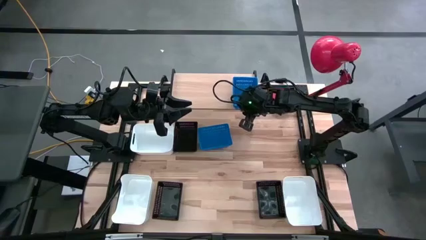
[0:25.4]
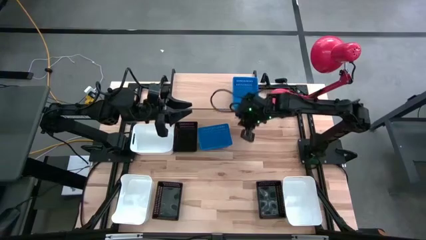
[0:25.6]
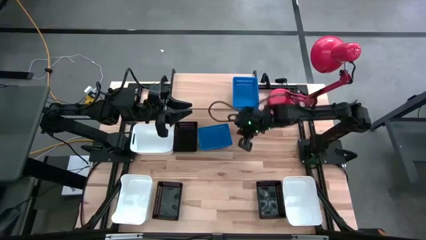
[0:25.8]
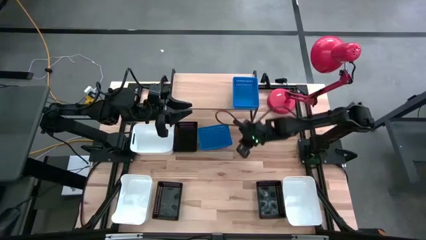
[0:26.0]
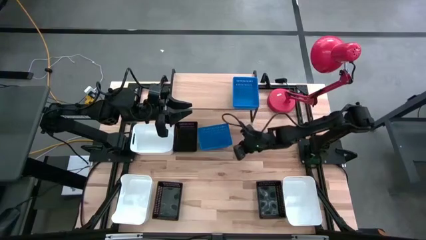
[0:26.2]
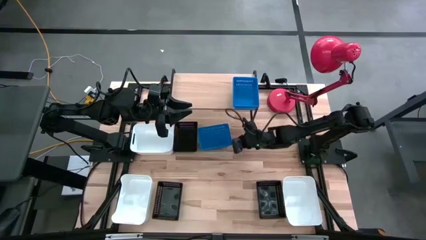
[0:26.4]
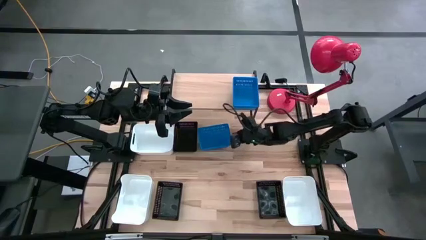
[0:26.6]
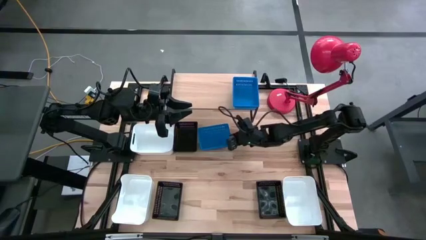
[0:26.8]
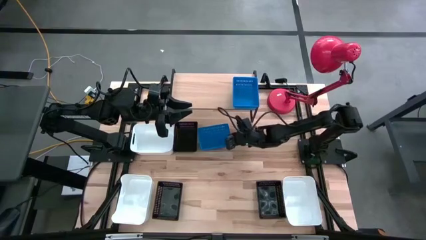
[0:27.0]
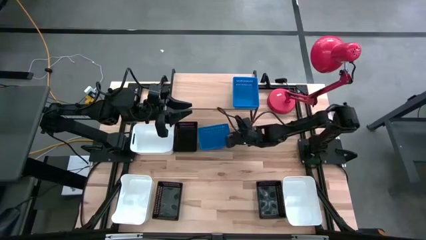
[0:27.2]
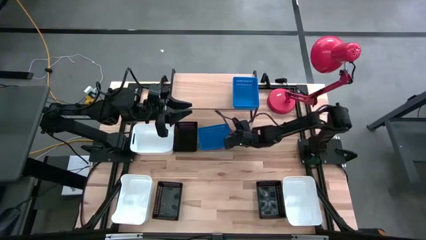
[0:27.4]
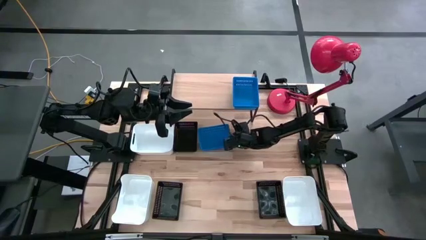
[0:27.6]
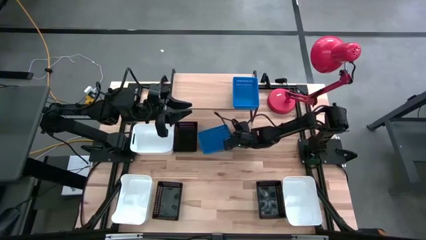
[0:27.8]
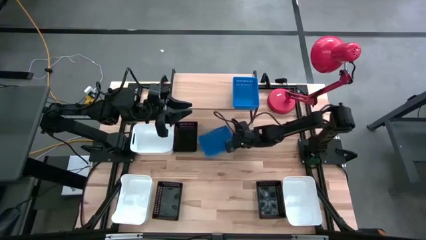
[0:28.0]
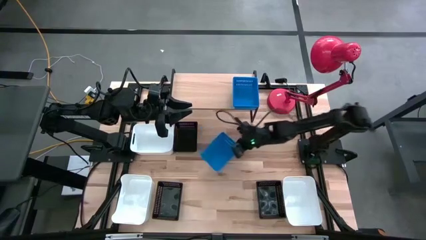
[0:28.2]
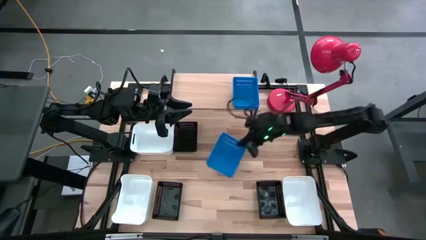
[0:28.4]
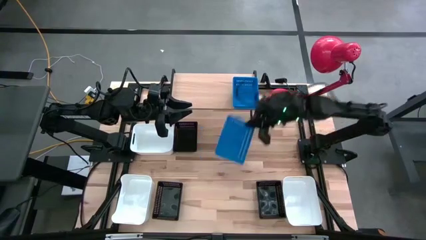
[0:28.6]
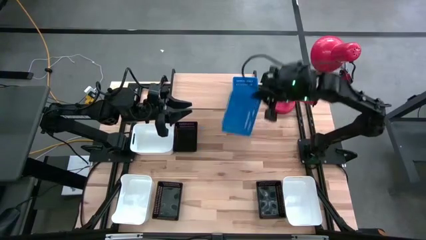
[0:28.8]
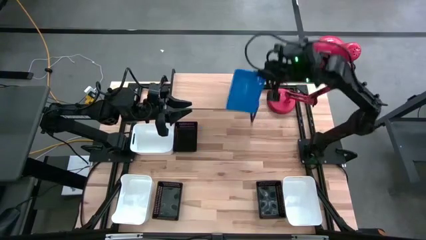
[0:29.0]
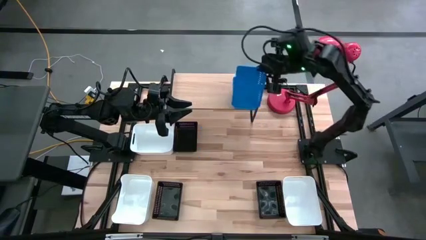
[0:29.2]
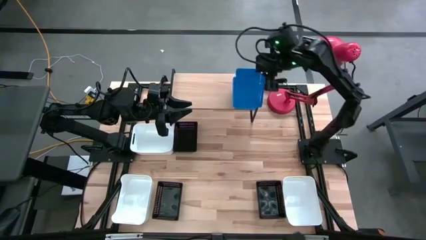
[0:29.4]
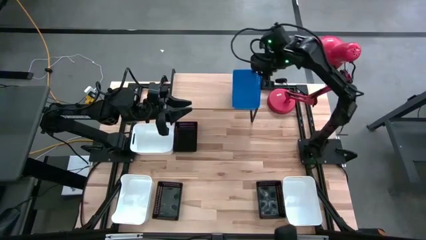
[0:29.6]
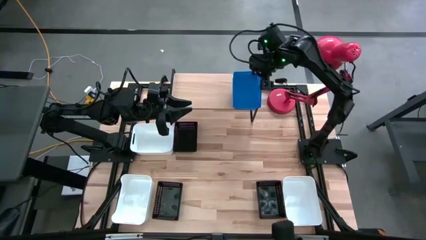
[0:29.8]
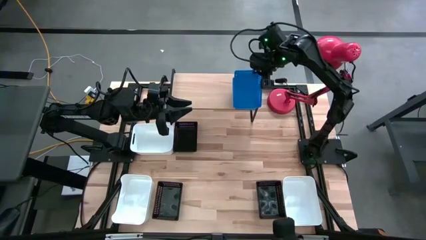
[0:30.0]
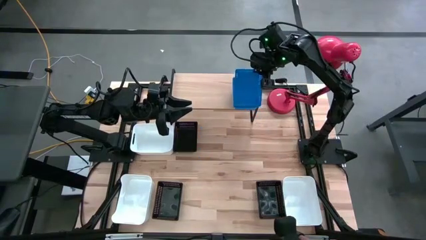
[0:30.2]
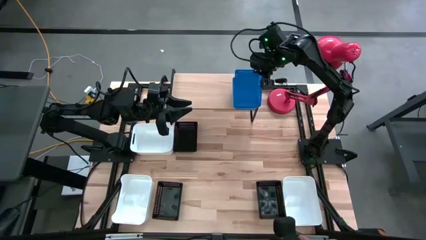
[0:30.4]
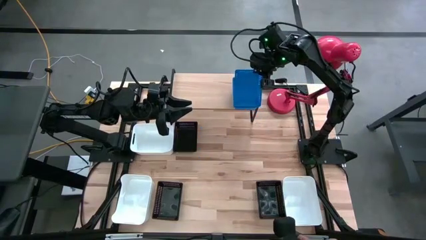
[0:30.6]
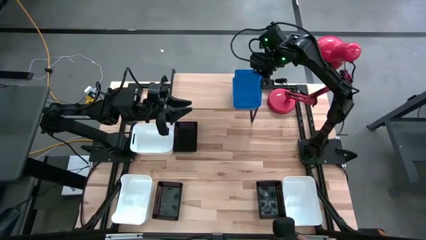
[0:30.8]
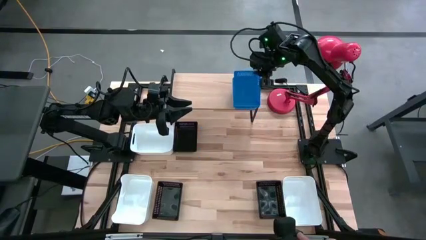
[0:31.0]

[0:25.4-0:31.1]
Task: Stack baskets on shelf by color
Stack the blue bin on top of the other blue bins on the shelf

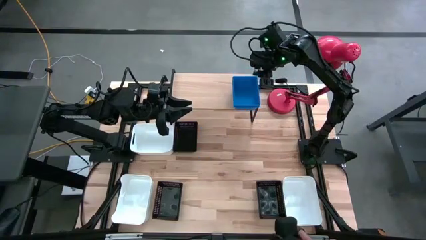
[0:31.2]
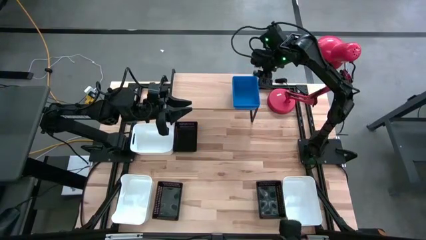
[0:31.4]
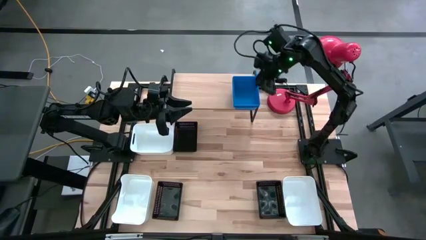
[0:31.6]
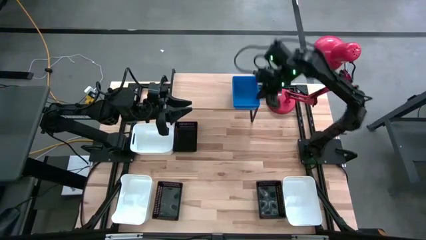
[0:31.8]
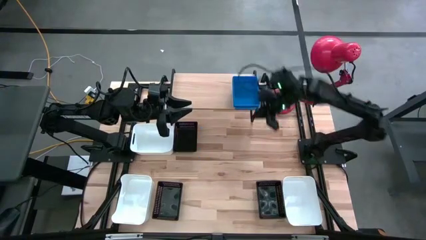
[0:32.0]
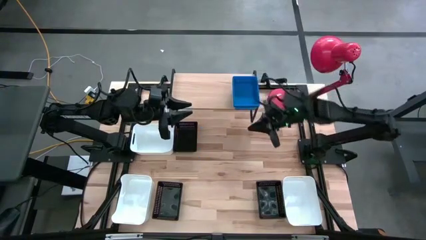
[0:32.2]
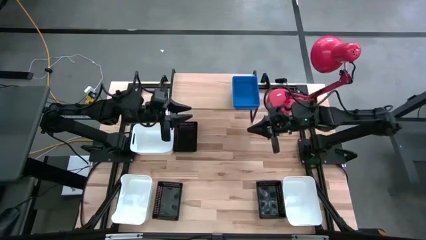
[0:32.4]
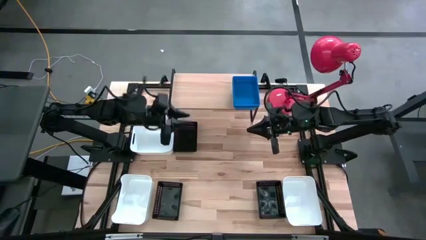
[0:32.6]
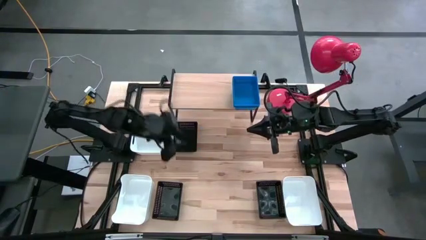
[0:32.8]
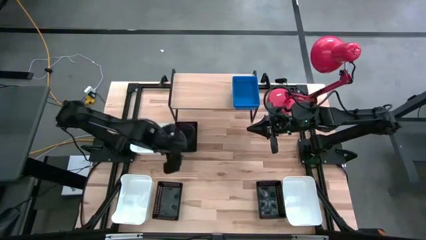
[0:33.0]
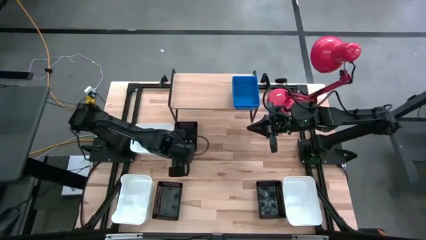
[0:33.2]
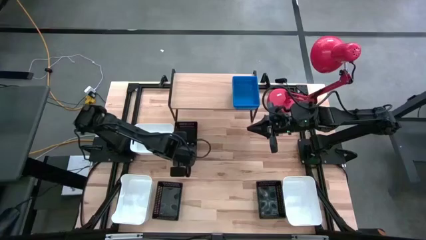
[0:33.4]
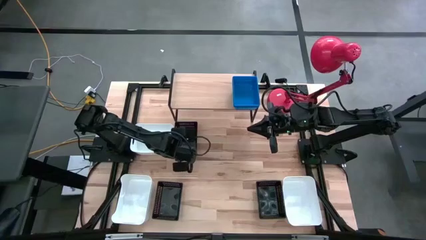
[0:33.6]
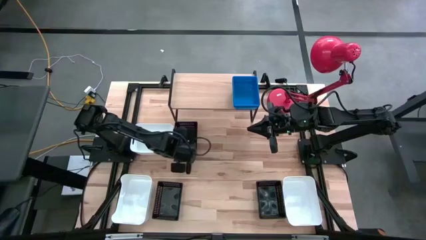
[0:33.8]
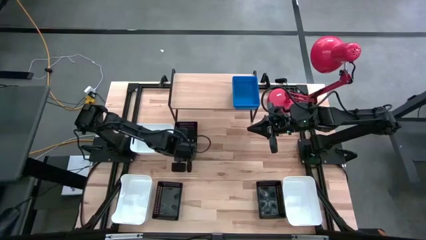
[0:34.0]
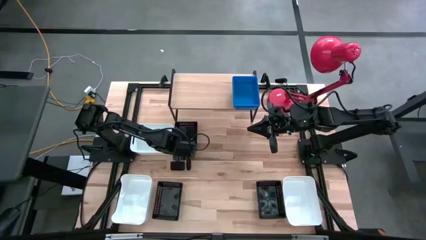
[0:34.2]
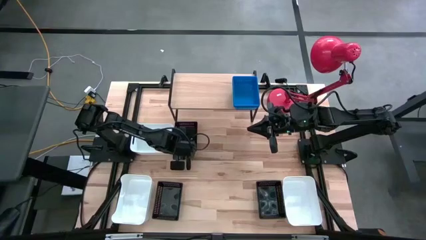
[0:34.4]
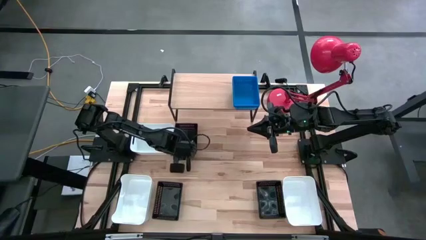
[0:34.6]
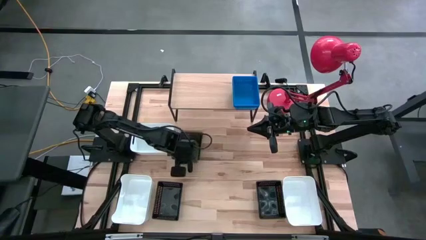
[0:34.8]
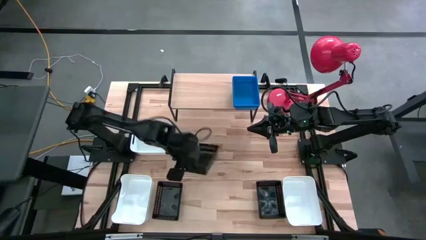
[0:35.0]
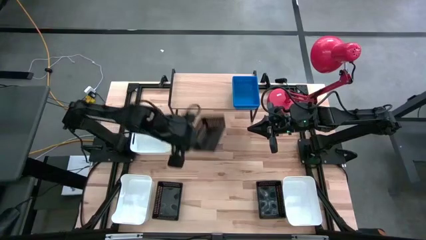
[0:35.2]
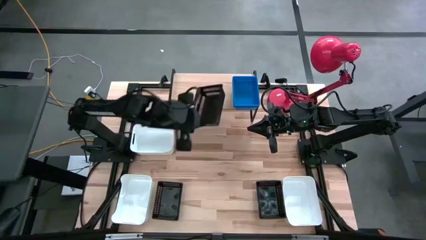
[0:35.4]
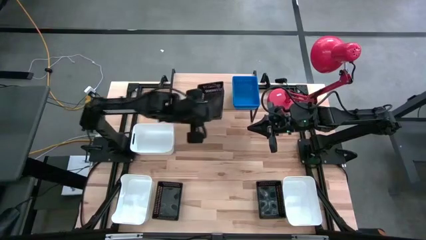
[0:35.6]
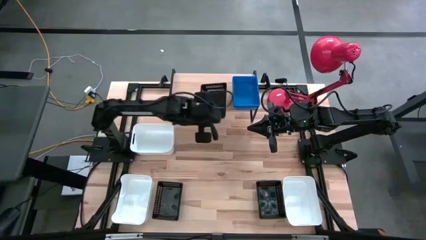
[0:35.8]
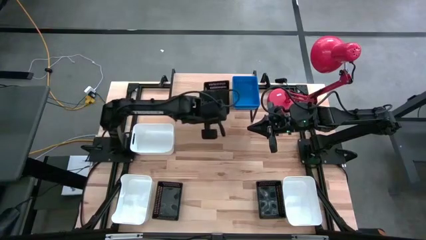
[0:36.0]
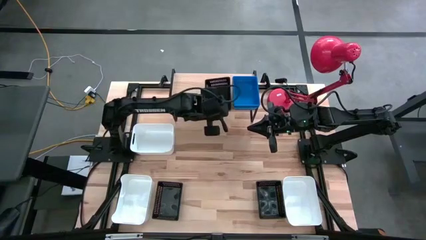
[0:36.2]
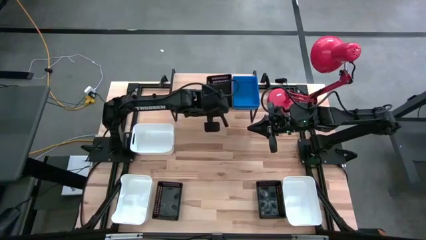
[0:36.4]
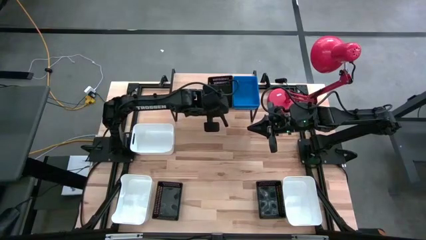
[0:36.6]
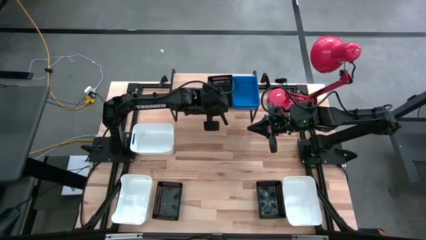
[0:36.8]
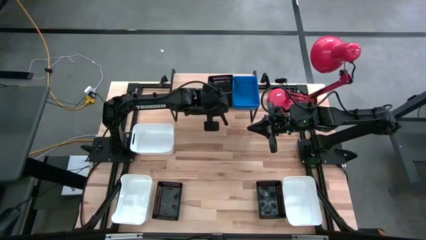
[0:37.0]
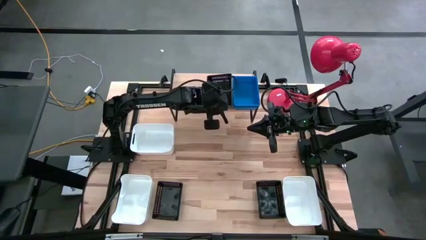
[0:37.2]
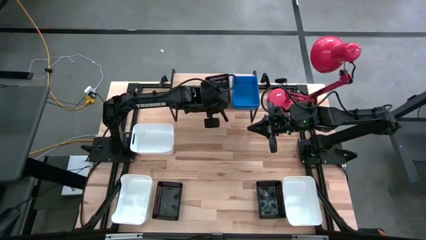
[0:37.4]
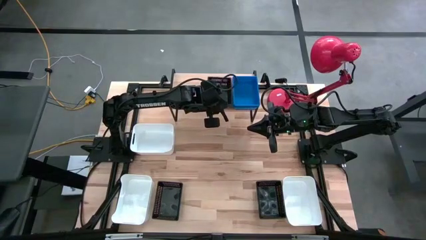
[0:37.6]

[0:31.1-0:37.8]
Put the top black bin in the middle of the shelf

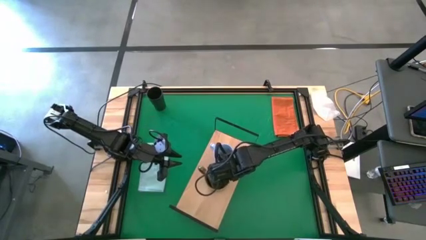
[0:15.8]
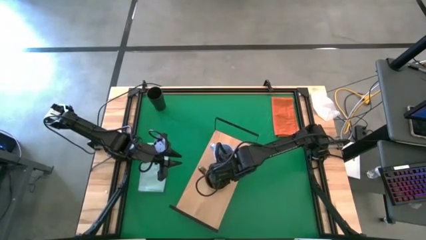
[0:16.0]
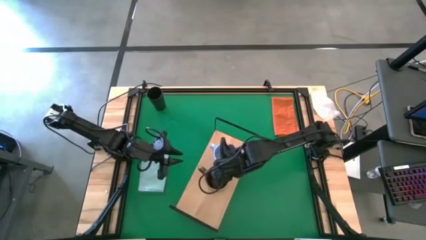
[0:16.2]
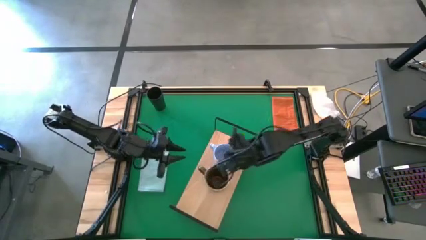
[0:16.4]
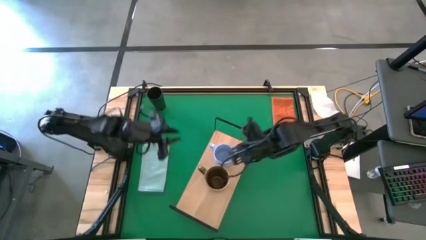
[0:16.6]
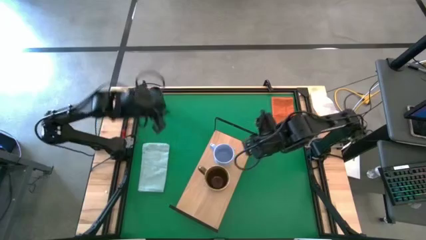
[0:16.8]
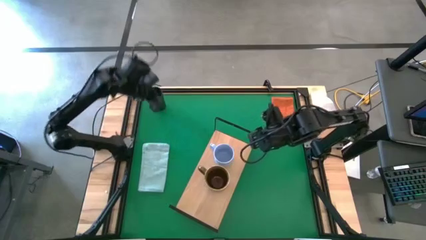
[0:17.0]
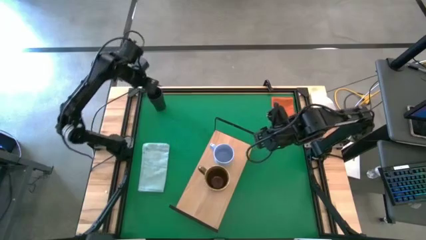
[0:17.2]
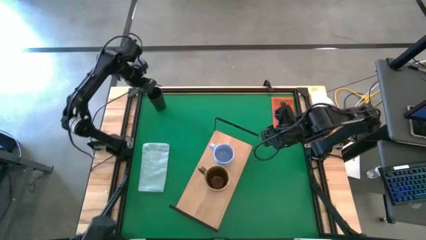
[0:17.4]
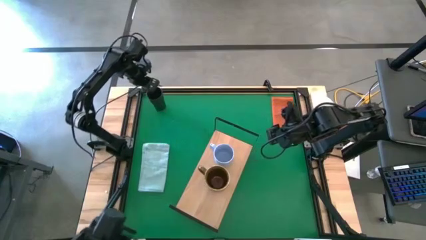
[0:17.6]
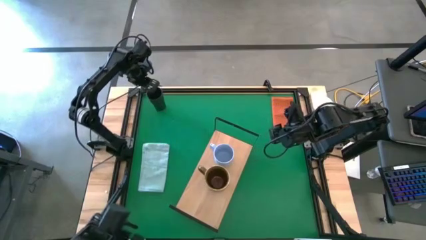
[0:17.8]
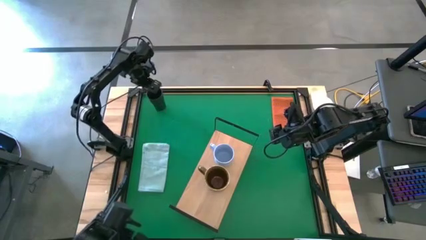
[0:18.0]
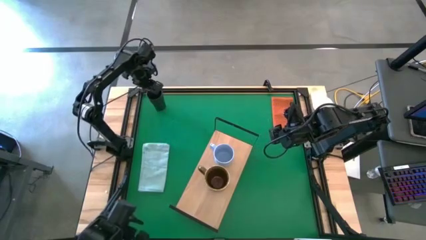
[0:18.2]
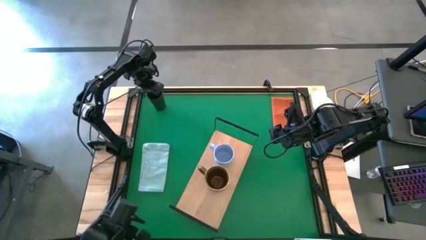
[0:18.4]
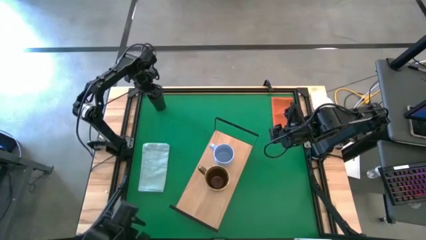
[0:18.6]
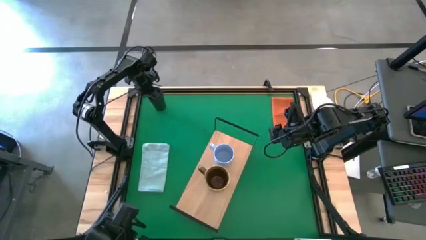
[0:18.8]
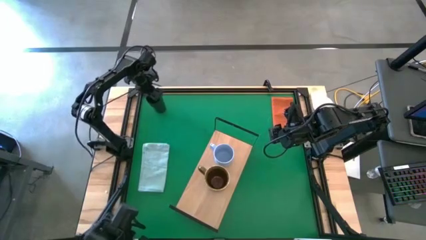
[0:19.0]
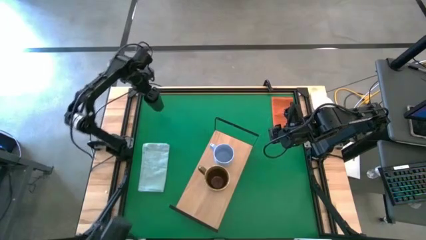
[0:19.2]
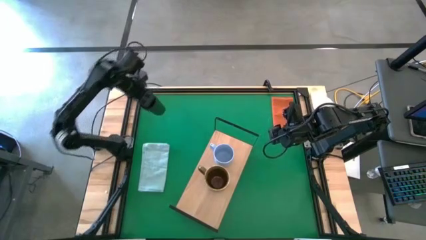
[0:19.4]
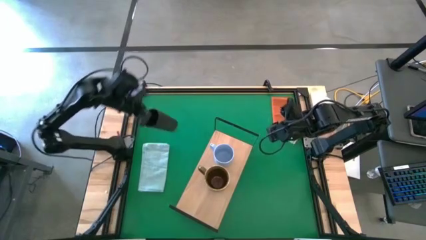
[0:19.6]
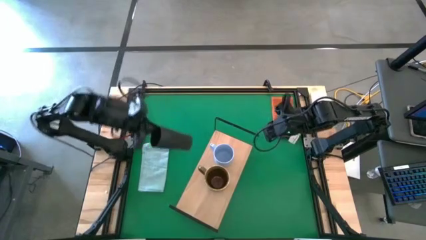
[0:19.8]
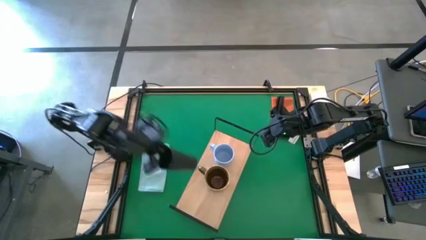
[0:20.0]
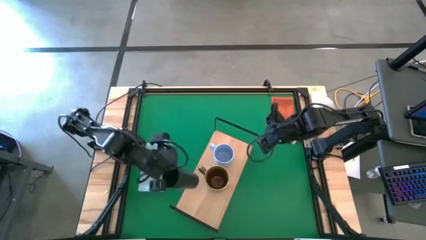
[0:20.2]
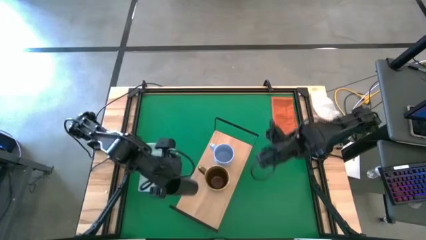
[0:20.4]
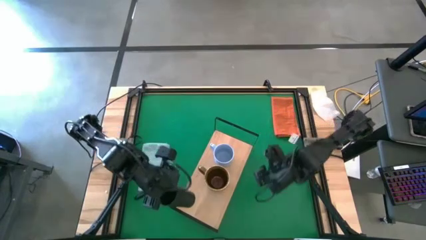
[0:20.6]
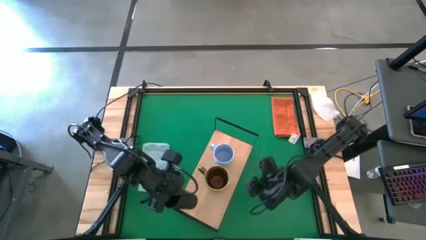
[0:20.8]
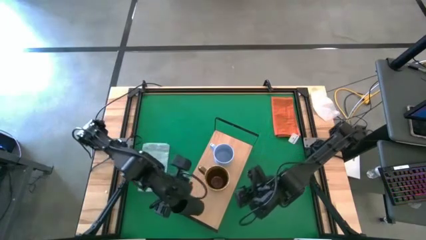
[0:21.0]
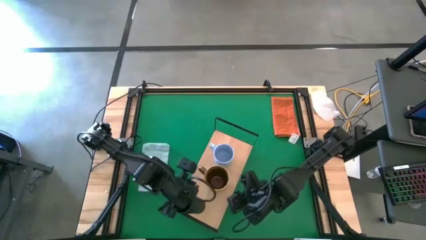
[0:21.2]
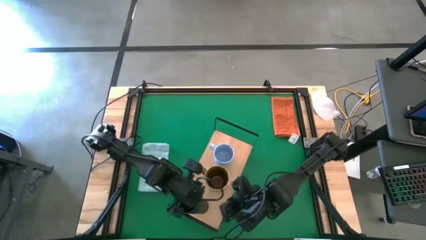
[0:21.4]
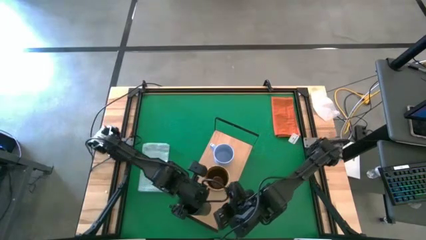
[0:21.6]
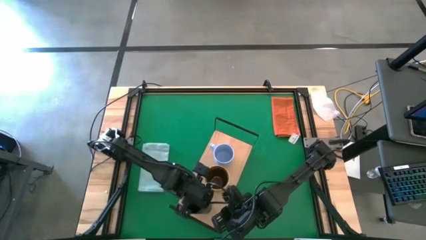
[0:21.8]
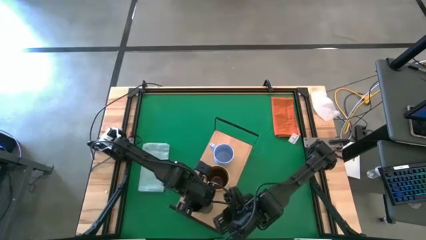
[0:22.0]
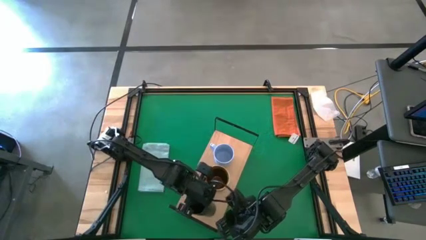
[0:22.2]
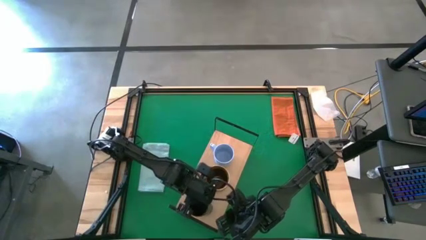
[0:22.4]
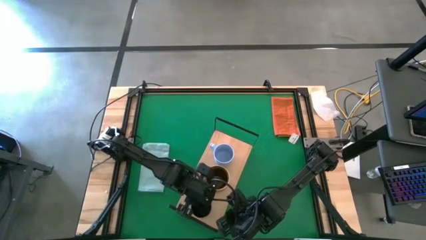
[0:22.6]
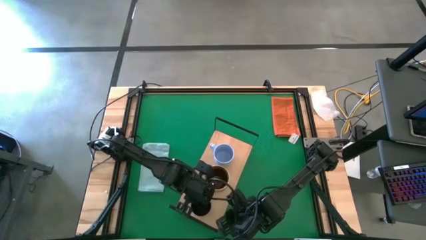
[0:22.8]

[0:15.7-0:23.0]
Task: Stack small to large cups/mugs on shelf
Put the black cup on the shelf
